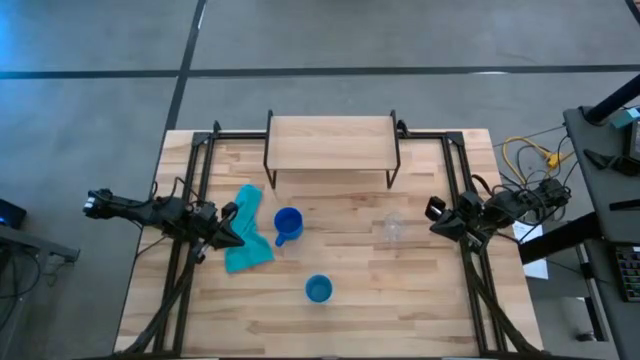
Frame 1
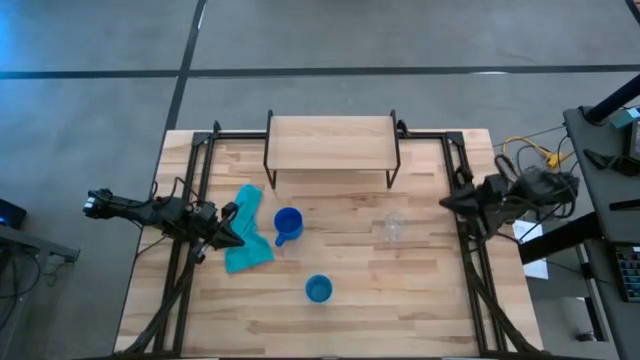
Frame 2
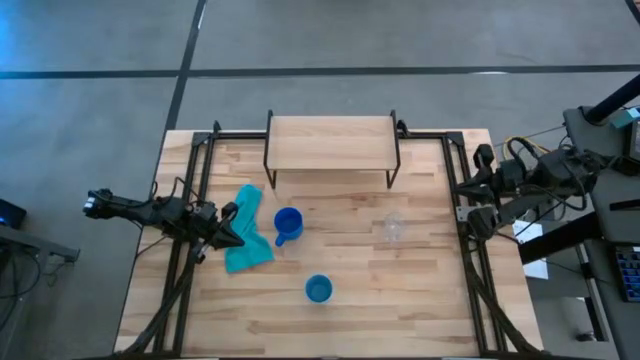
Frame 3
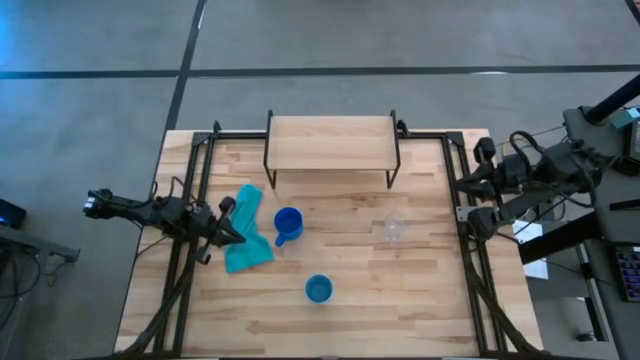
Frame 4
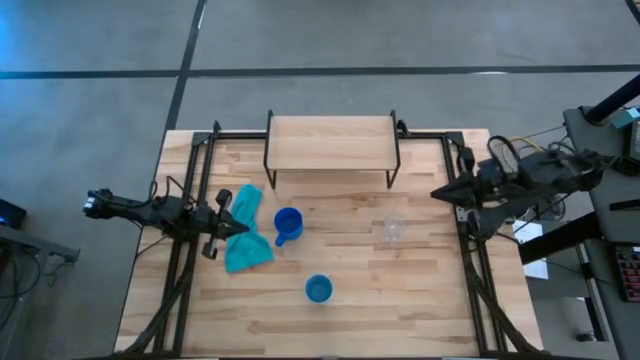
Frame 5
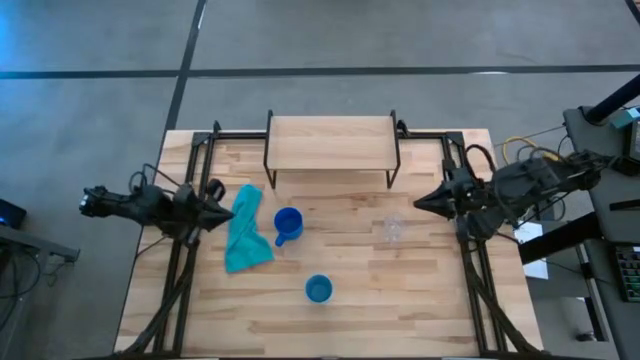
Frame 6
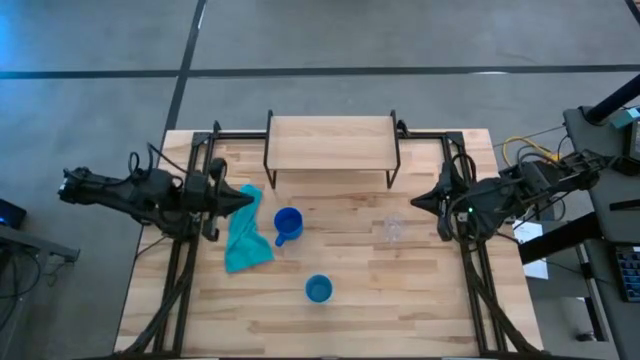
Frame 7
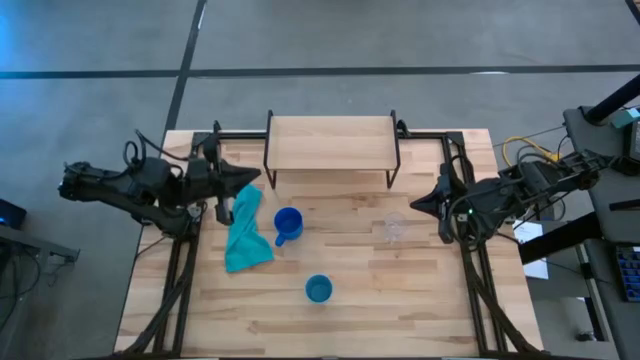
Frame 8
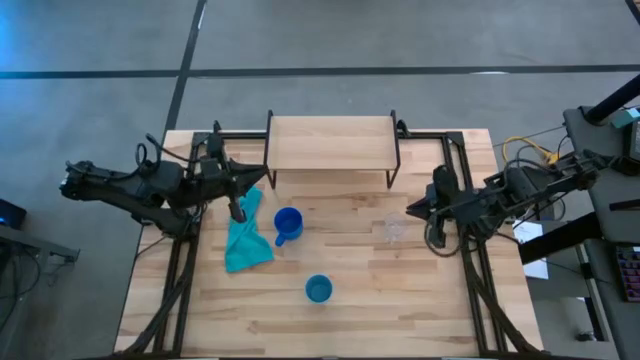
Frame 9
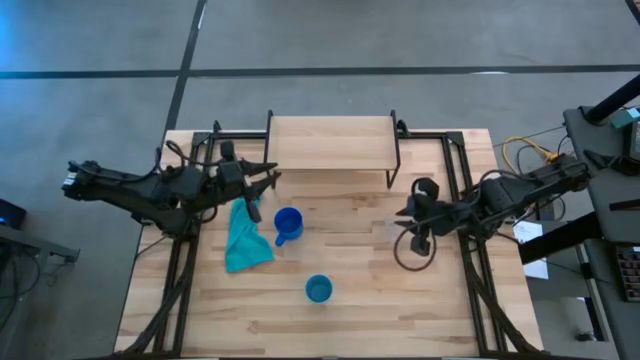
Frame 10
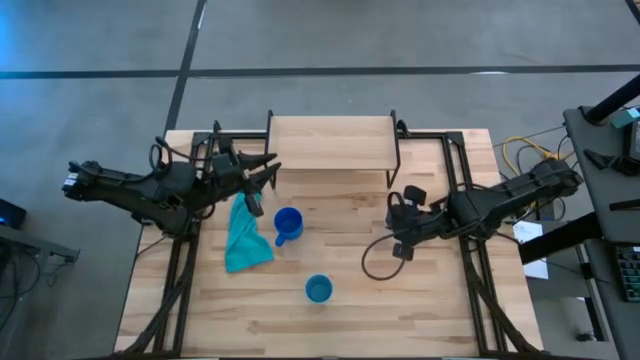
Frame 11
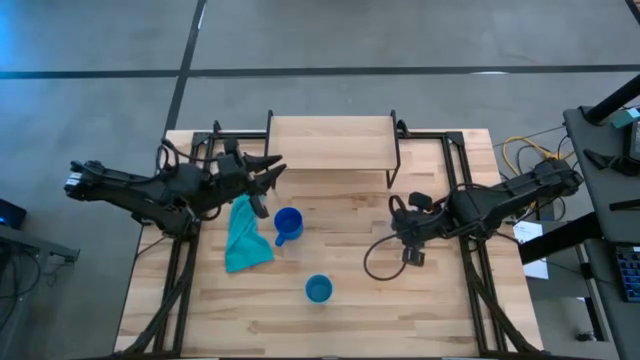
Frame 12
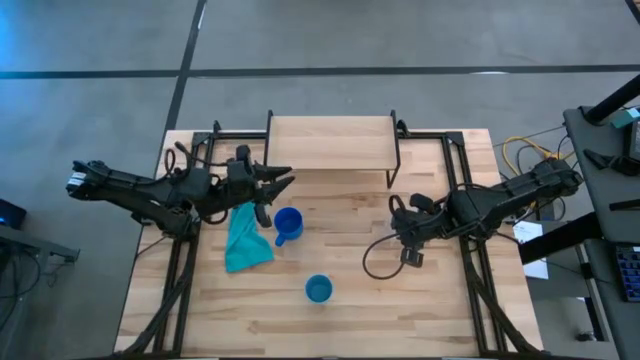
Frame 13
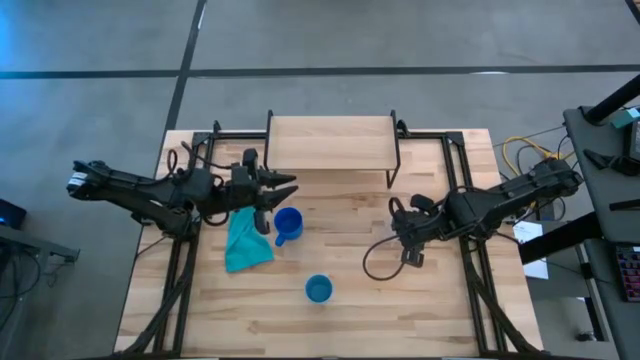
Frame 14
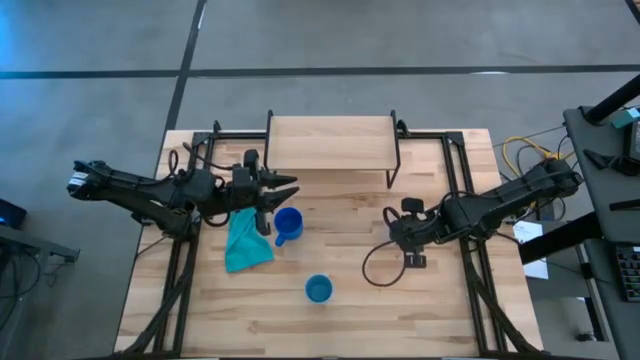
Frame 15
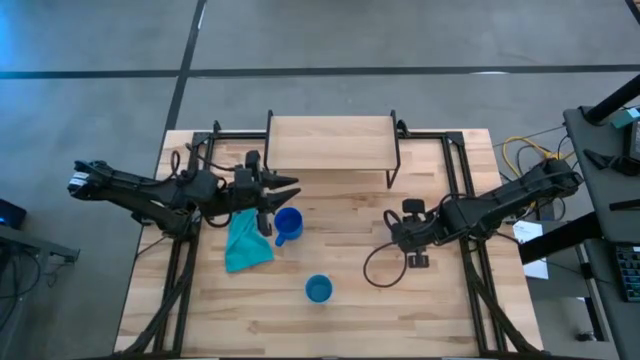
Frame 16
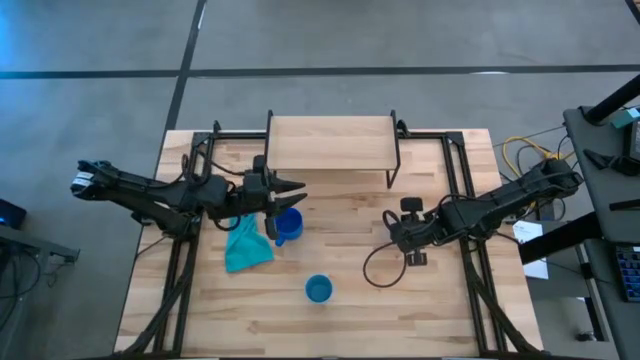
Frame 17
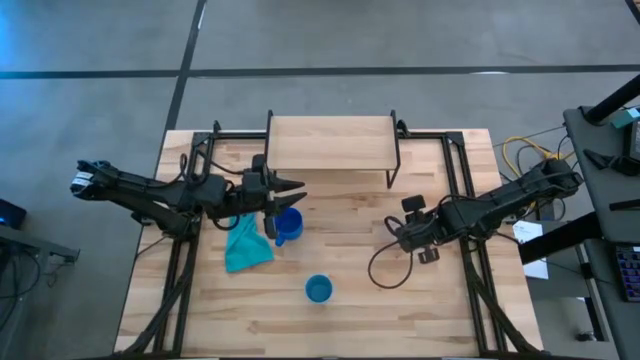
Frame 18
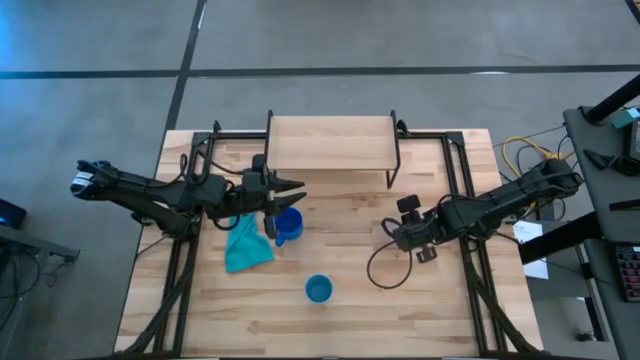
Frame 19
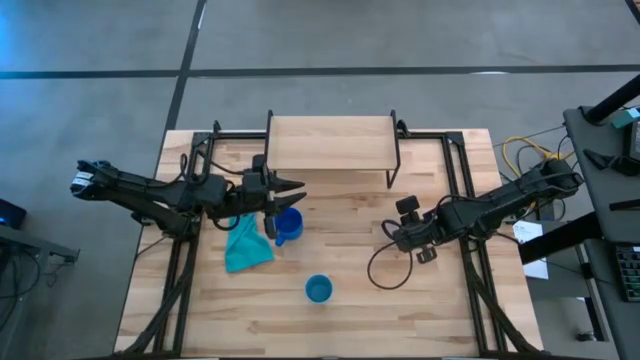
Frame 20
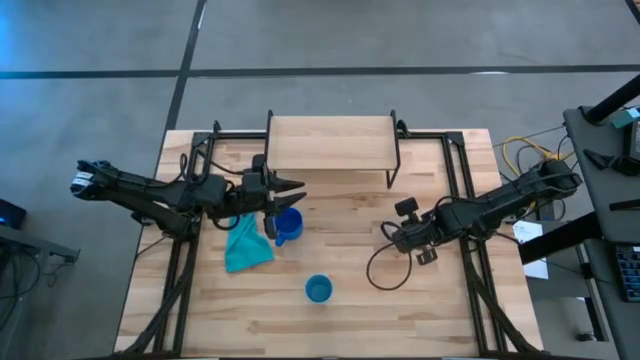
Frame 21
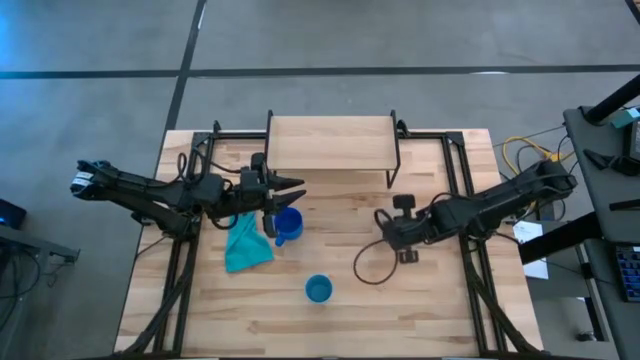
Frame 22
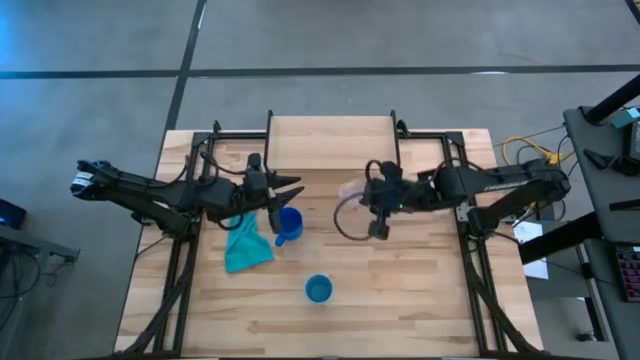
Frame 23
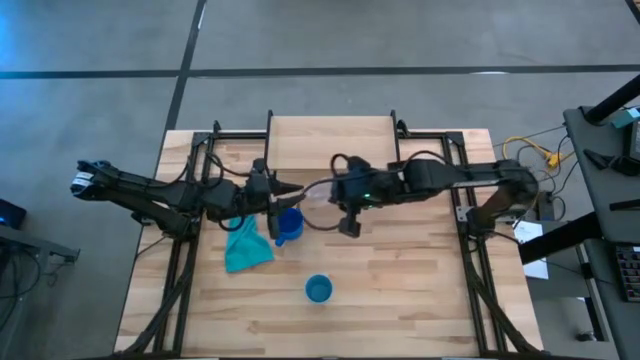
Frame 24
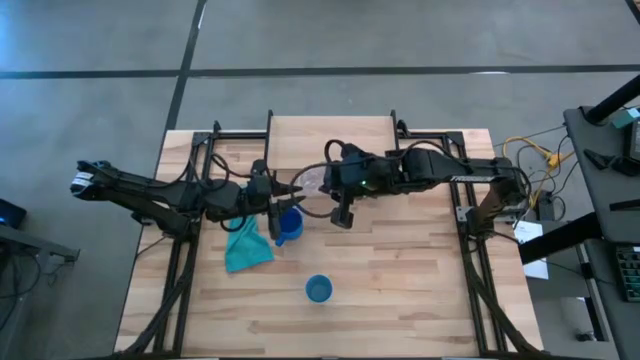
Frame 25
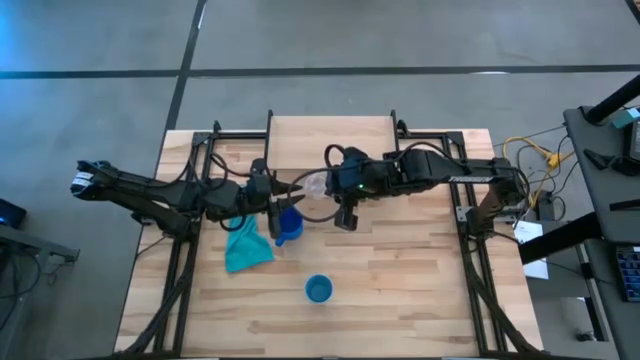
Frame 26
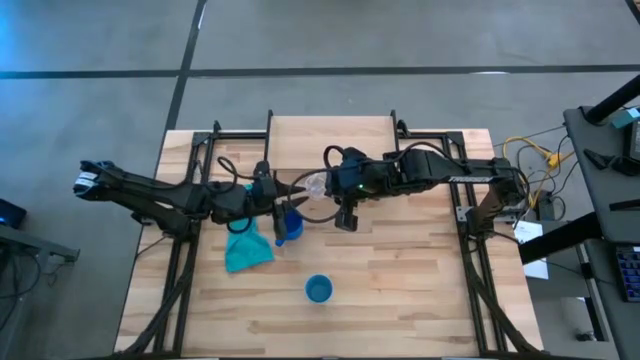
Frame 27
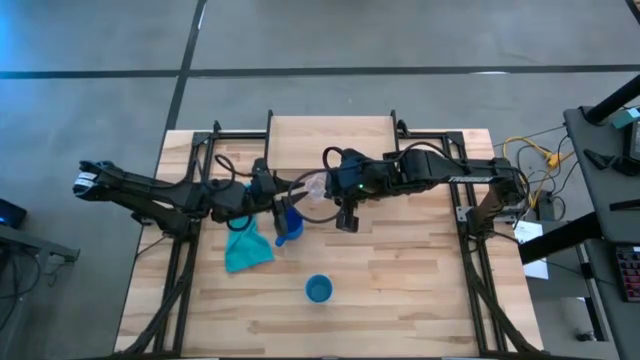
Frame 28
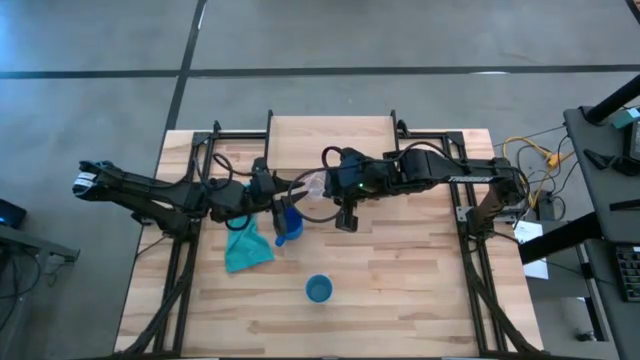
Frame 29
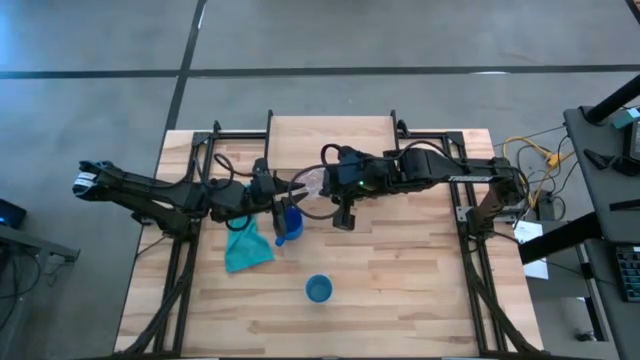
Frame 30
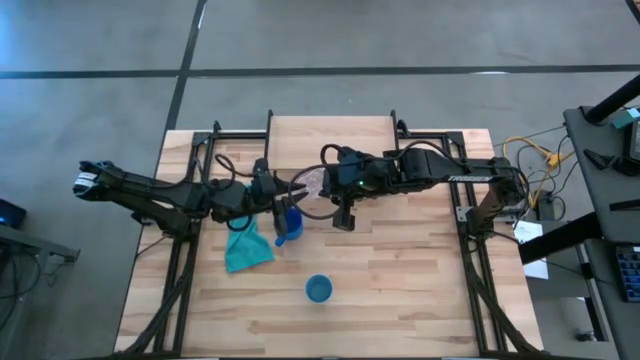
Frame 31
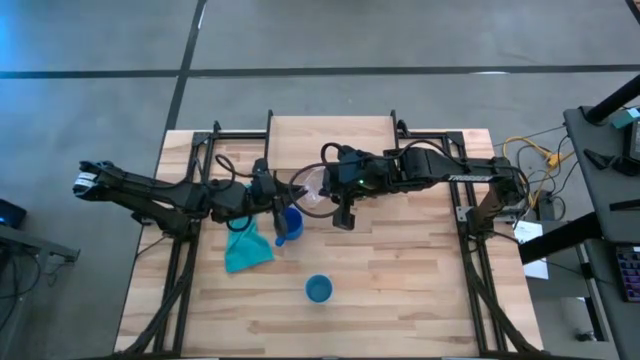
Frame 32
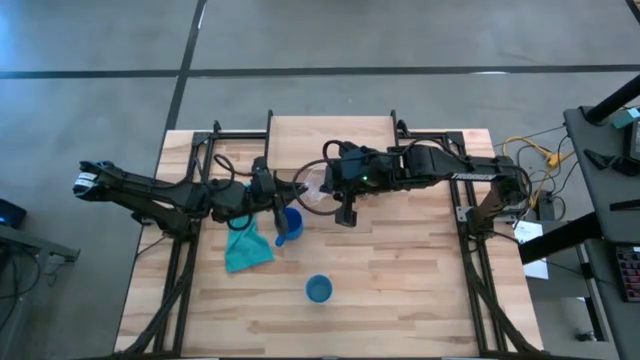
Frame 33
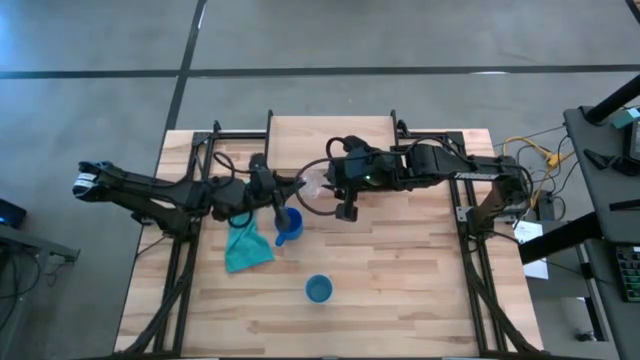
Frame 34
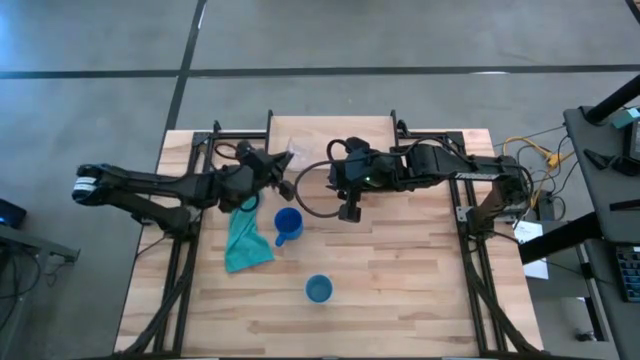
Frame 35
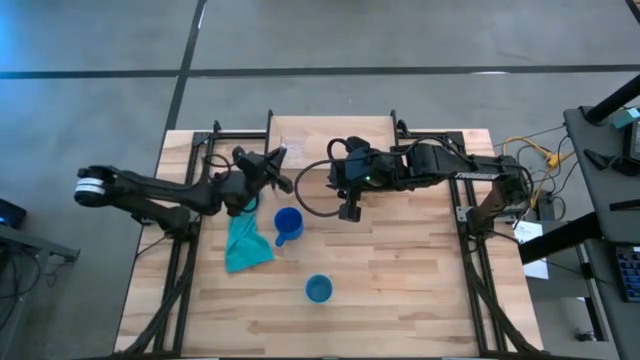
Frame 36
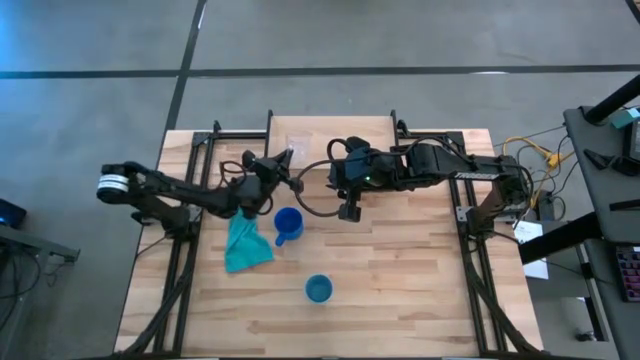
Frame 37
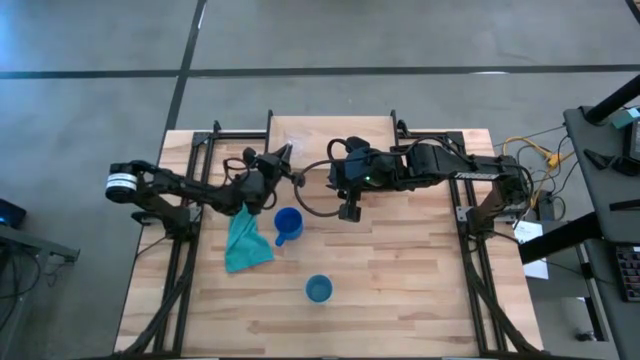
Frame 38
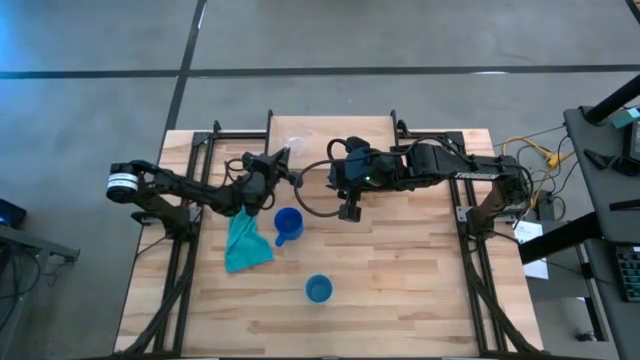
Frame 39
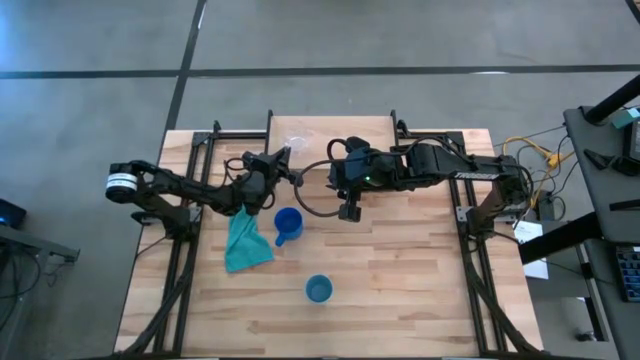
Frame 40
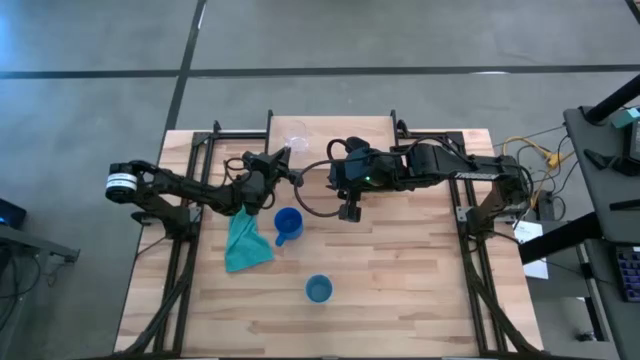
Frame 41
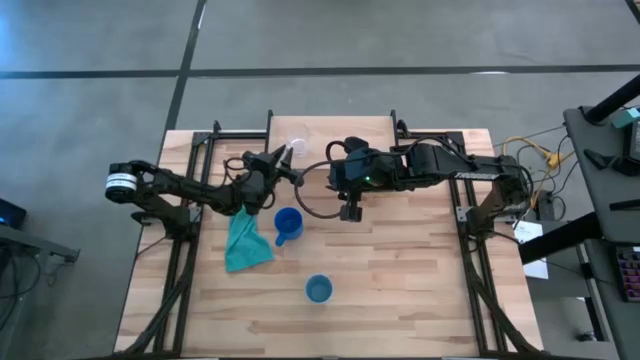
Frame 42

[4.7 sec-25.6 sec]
Task: Stack small to large cups/mugs on shelf
Put the transparent mug on the shelf
